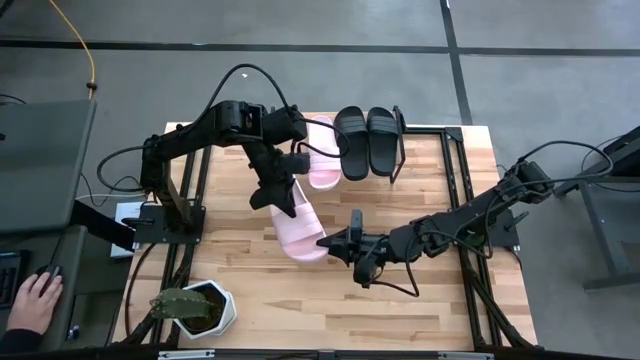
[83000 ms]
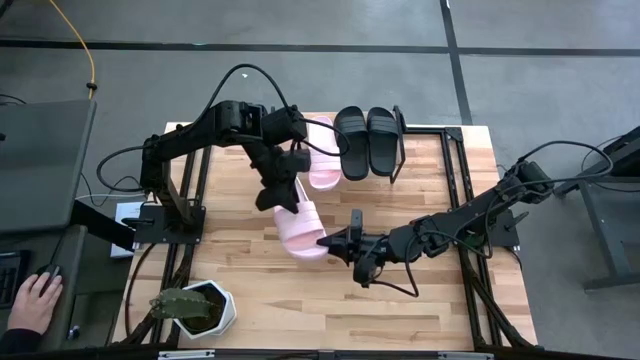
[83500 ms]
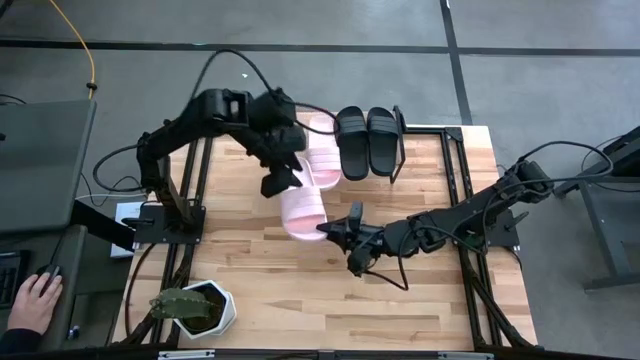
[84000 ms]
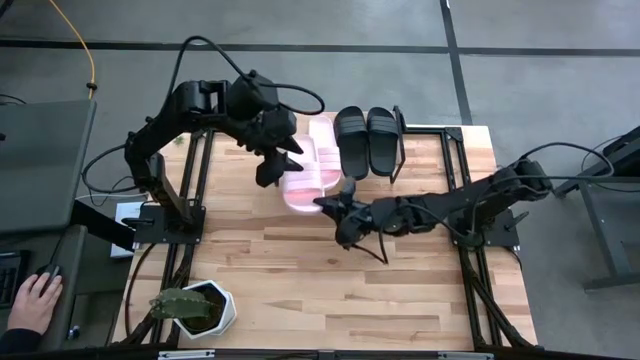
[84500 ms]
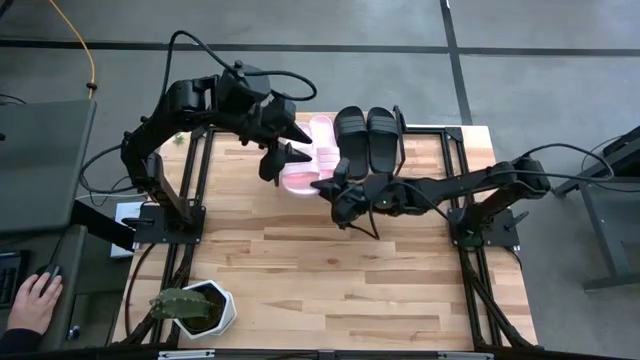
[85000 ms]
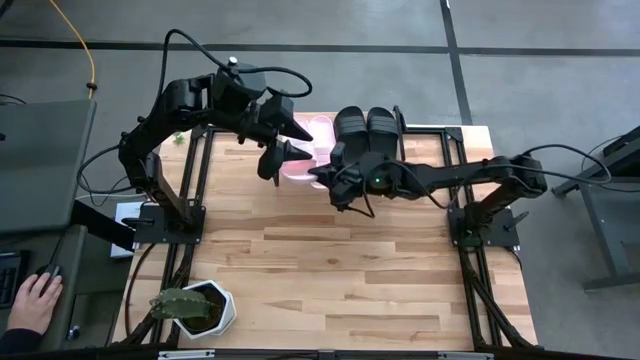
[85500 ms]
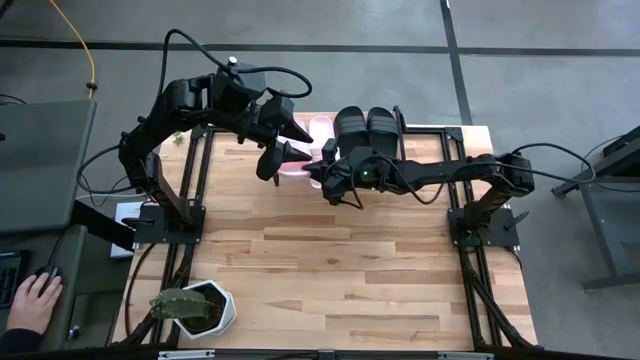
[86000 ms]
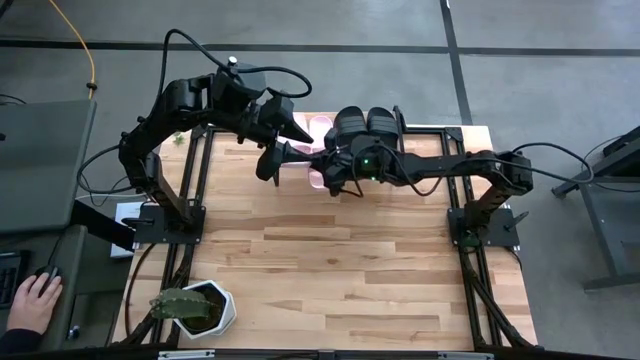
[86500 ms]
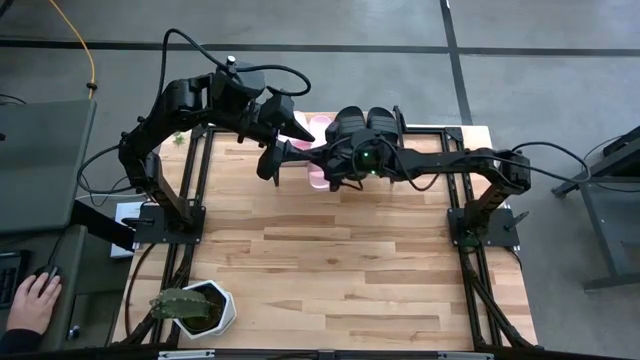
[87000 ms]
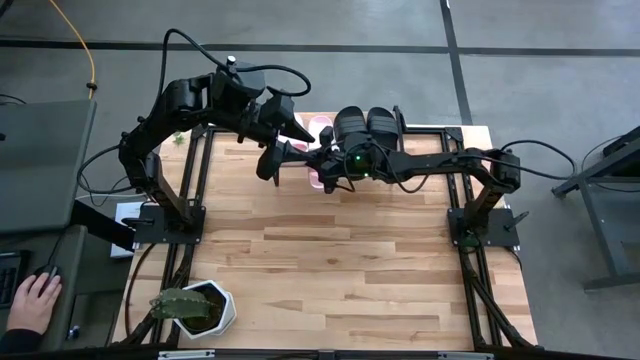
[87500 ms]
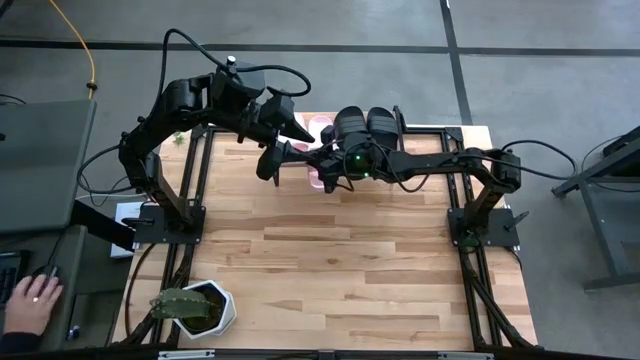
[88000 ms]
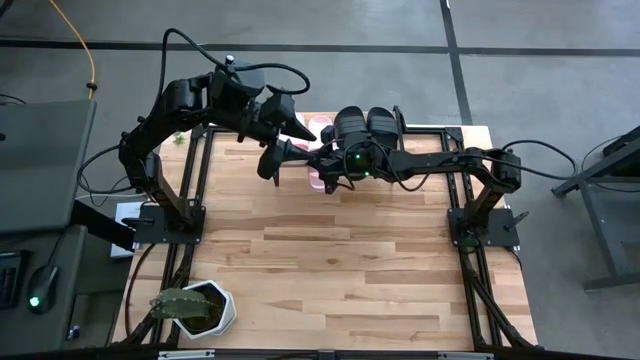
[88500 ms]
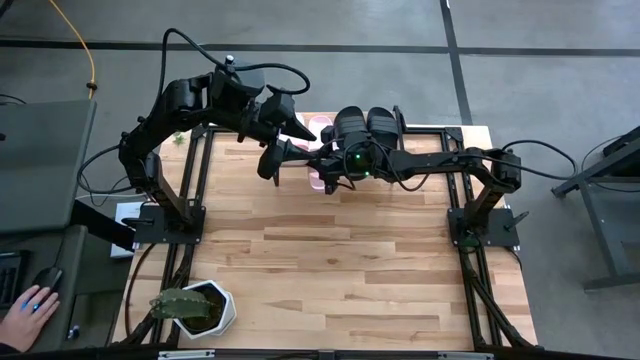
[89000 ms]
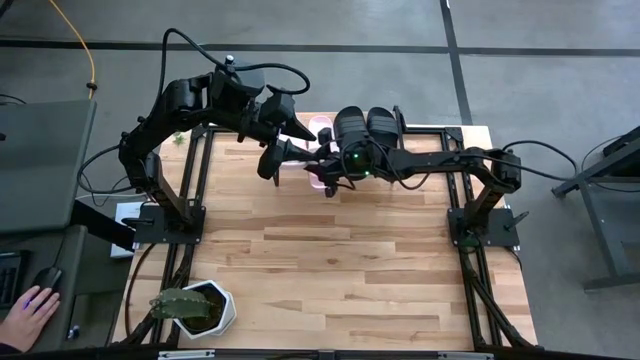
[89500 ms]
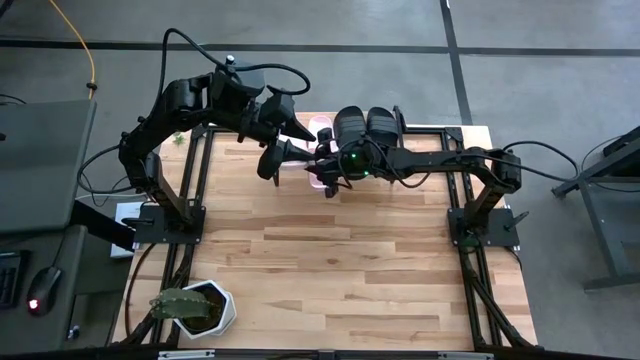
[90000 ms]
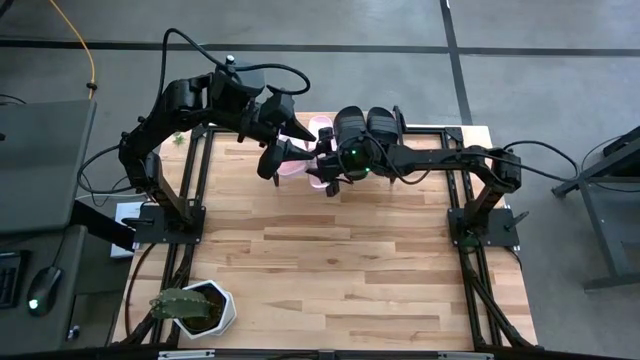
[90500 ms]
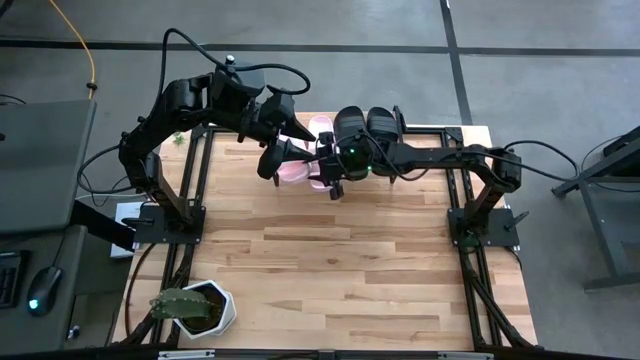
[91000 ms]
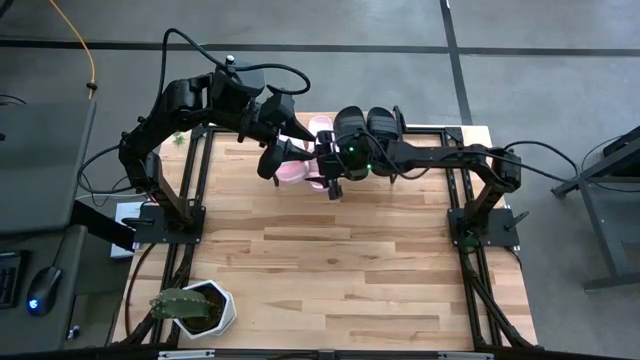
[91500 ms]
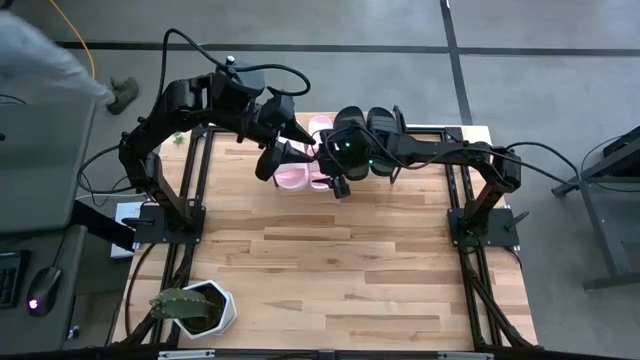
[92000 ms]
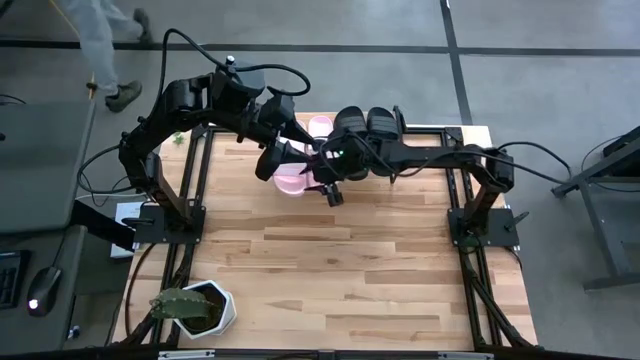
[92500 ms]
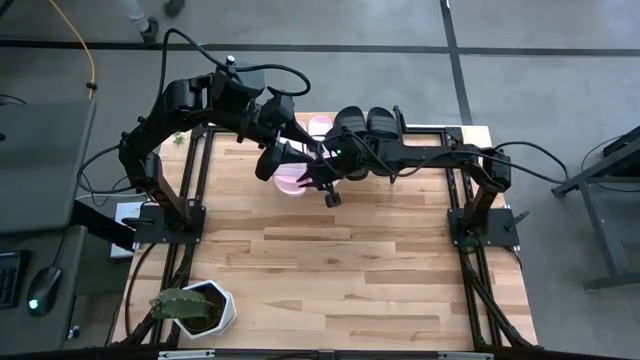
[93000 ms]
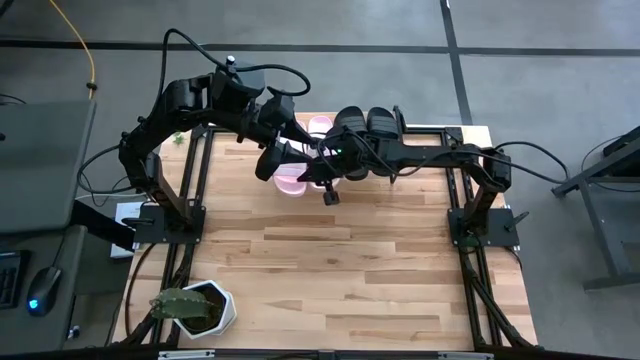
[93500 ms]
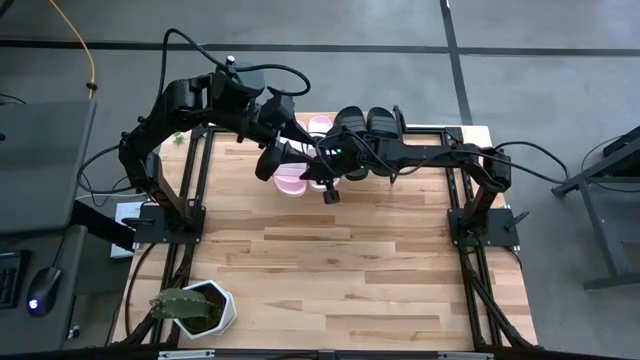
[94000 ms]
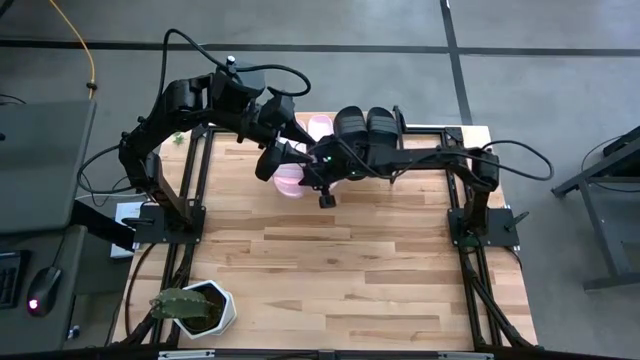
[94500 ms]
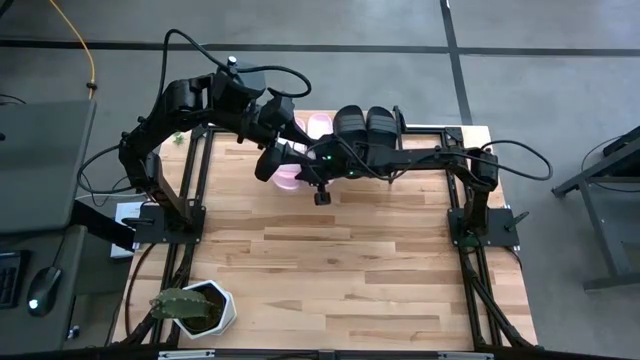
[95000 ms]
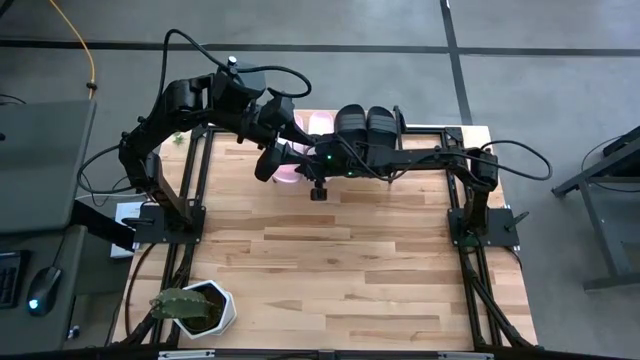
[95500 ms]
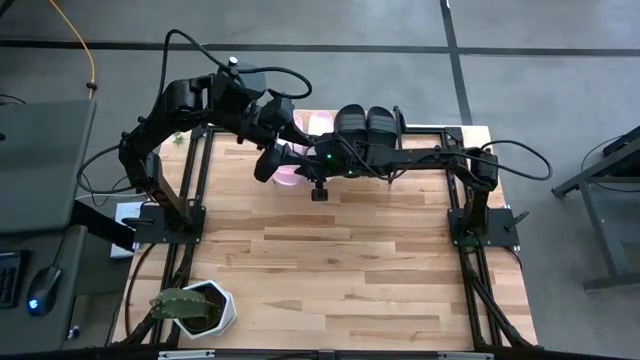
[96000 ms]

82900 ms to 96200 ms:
Task: Pick and place slides into the shelf
Put the pink slide on the shelf aligned with the other pink slide

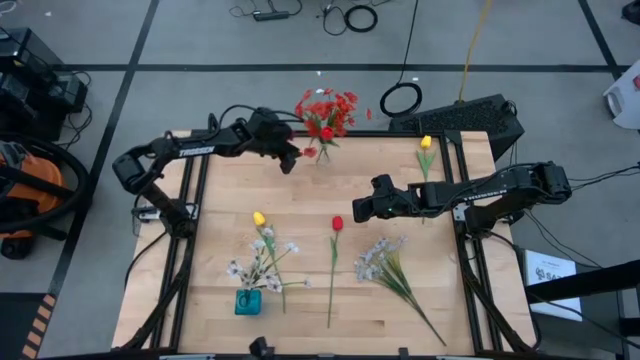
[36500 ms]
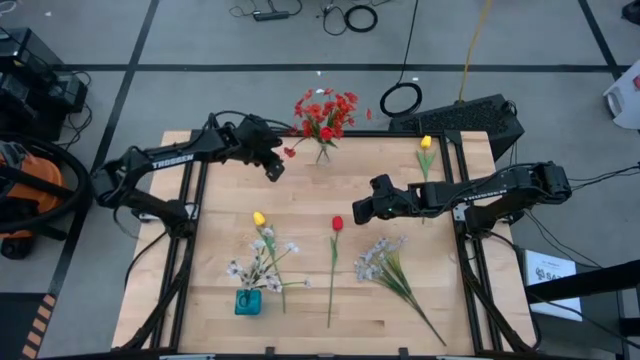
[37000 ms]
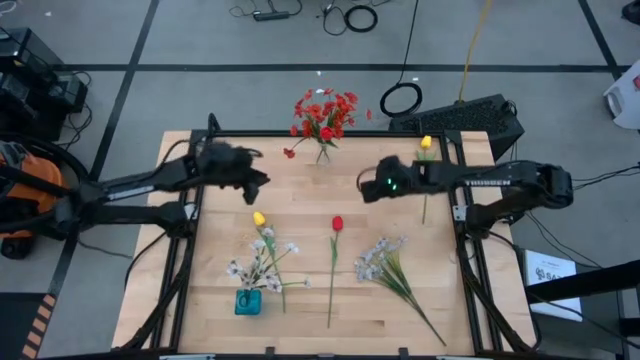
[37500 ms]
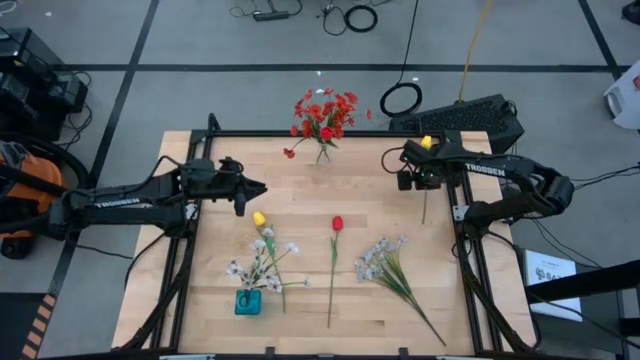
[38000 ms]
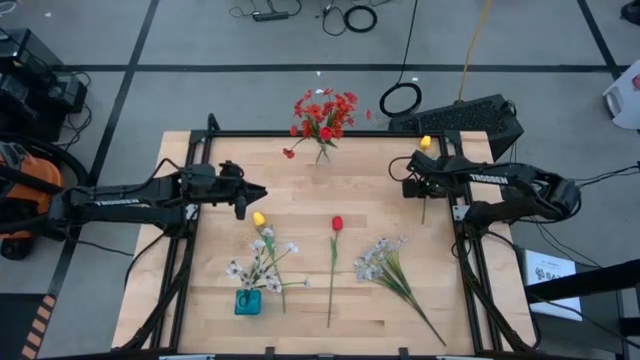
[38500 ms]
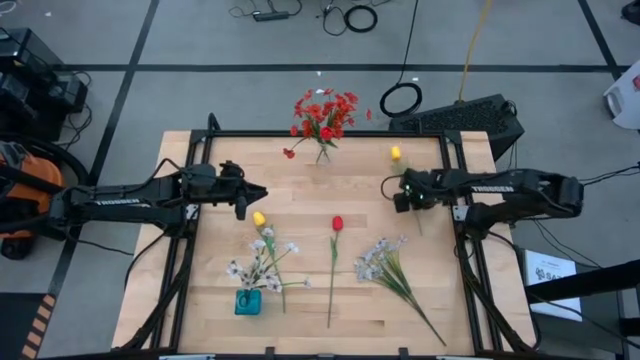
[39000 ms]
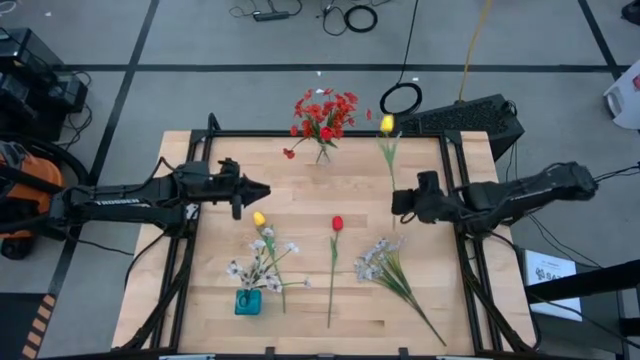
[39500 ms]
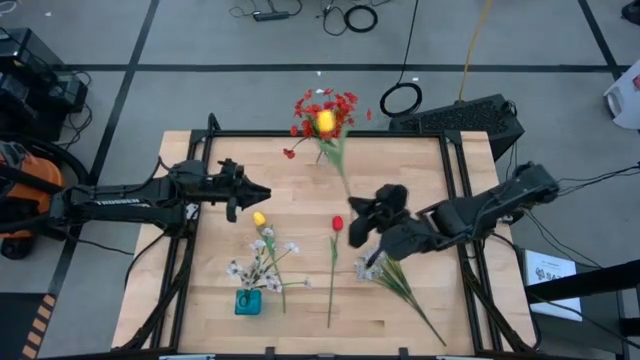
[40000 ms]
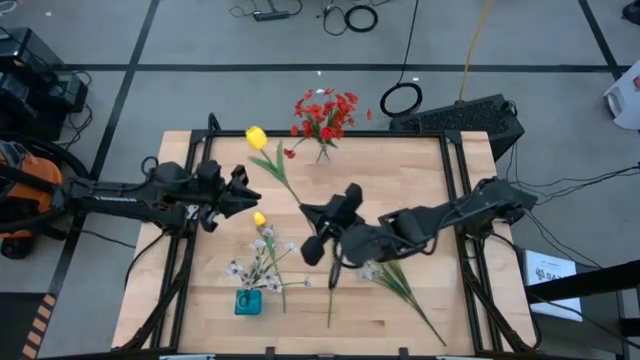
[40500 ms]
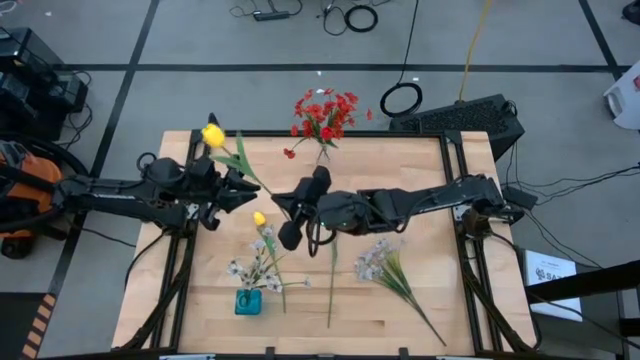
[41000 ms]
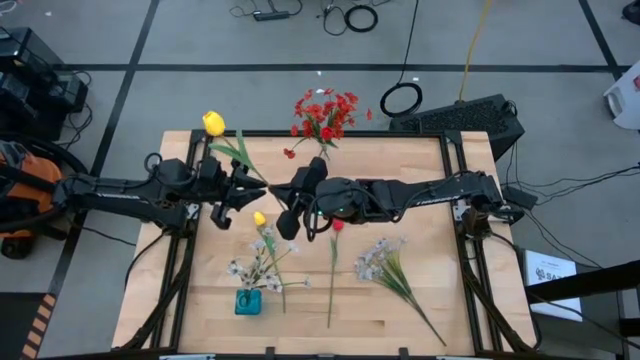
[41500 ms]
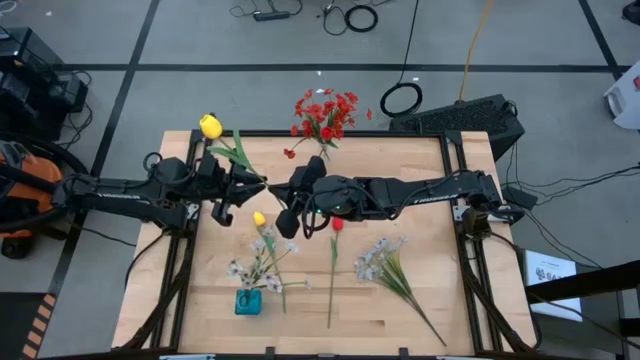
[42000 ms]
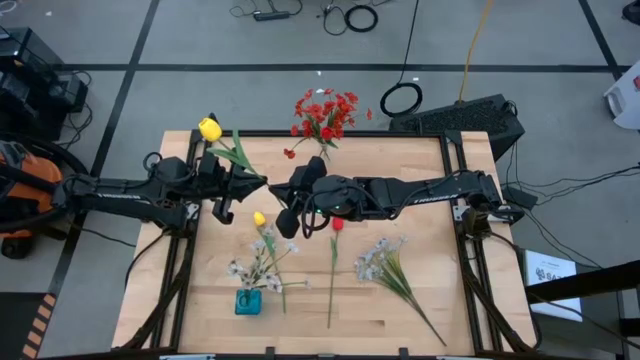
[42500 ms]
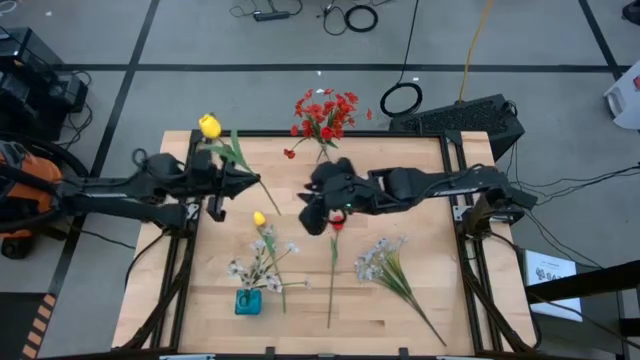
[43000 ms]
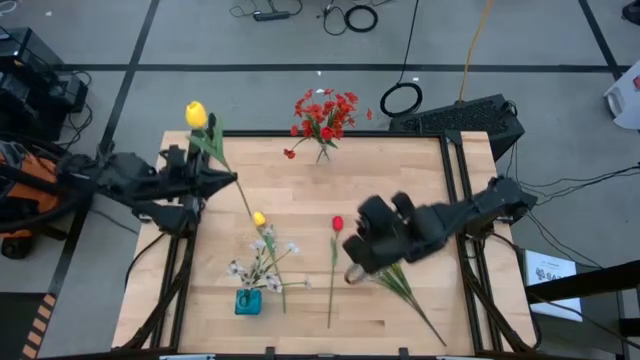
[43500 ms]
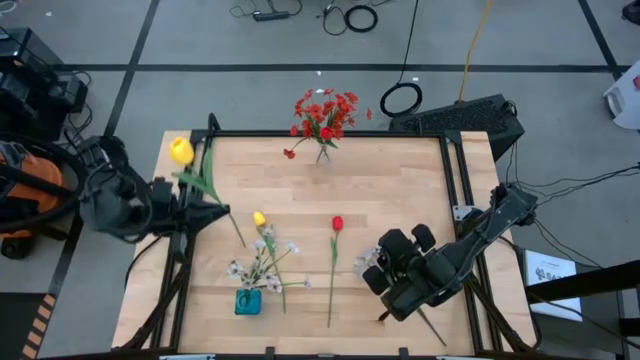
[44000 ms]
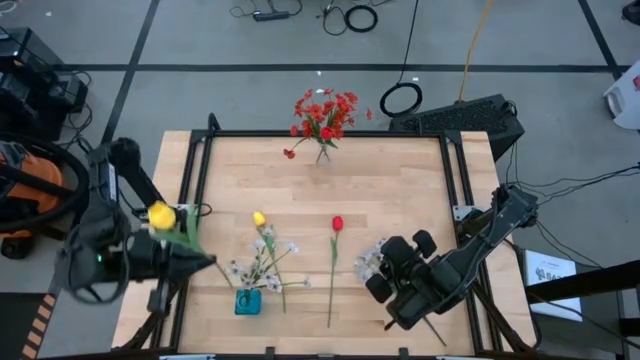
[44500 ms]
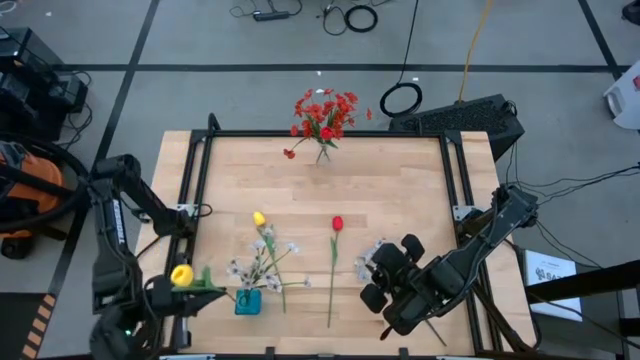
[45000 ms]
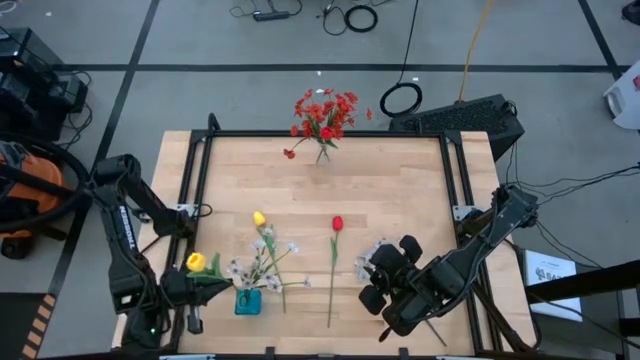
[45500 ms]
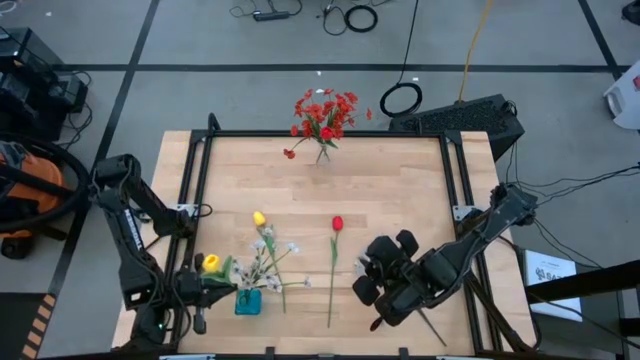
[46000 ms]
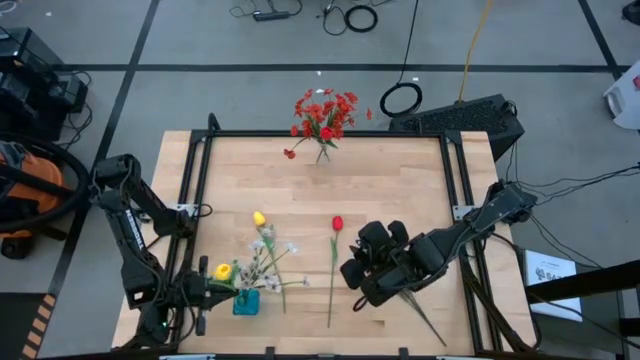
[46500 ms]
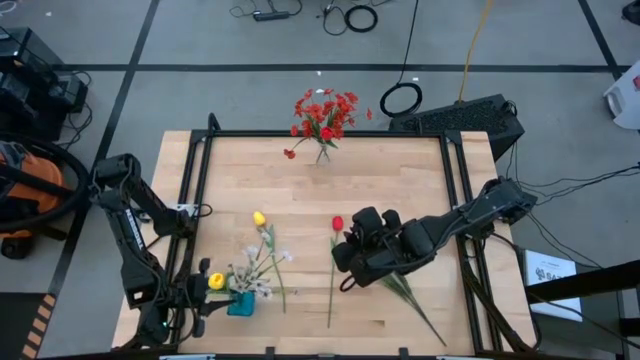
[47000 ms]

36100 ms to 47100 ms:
Task: Sort flowers into vase by color
Put the right yellow flower into the blue vase
